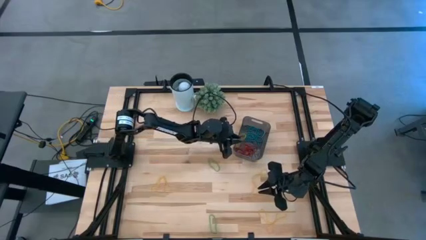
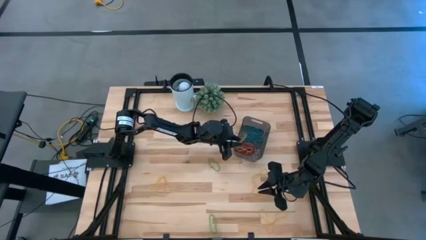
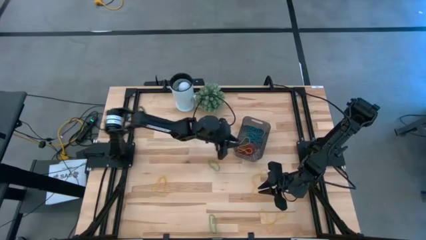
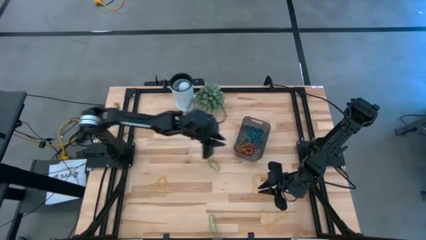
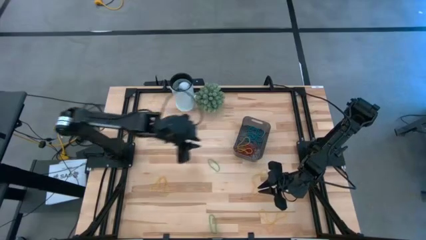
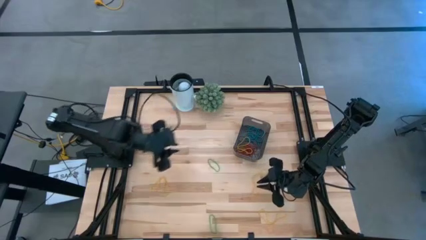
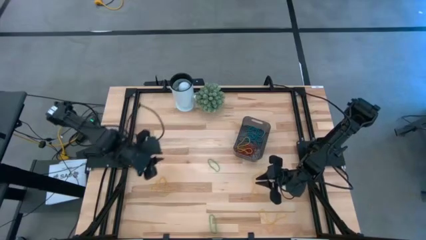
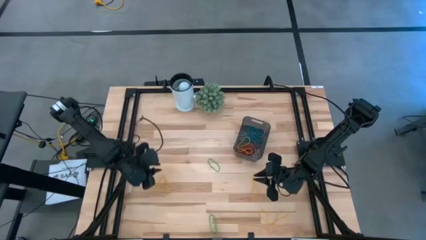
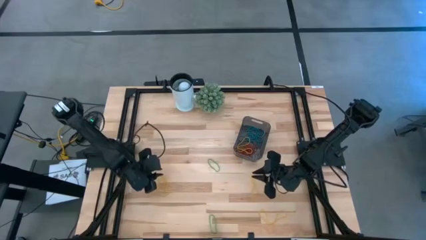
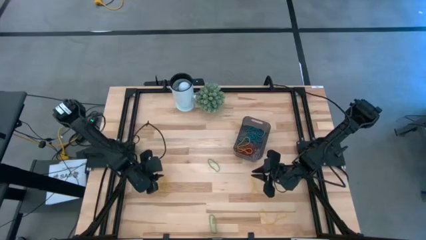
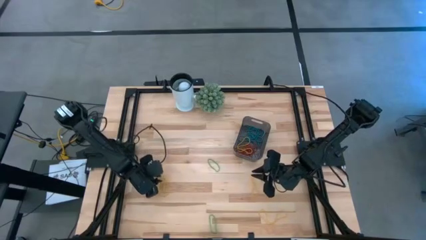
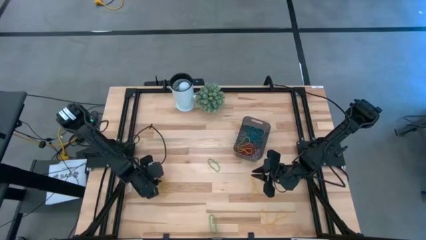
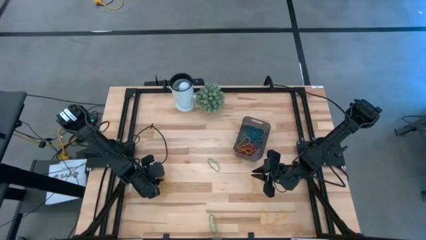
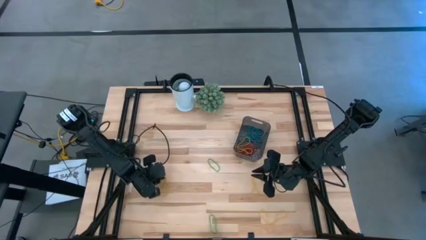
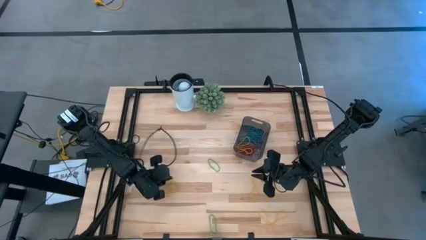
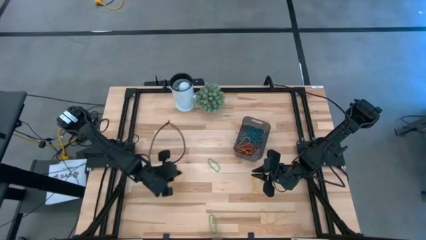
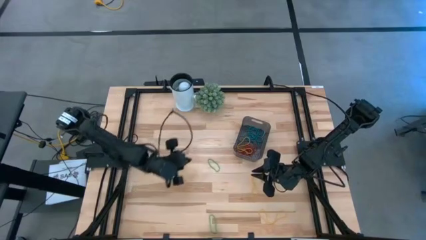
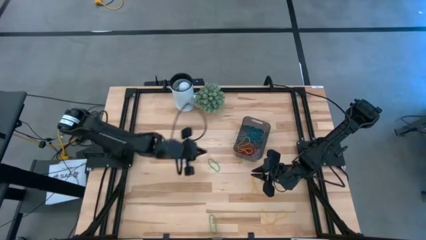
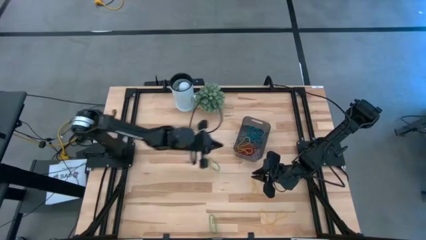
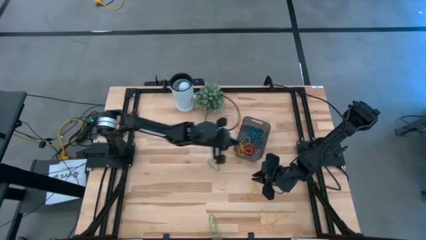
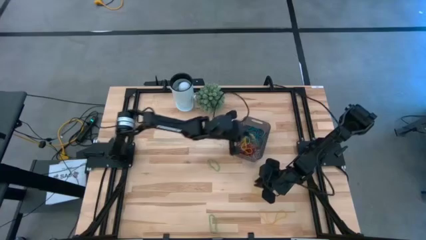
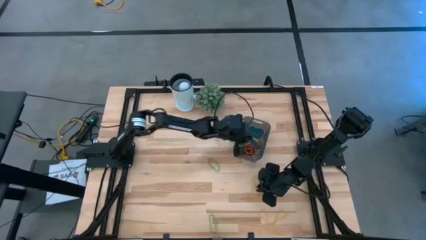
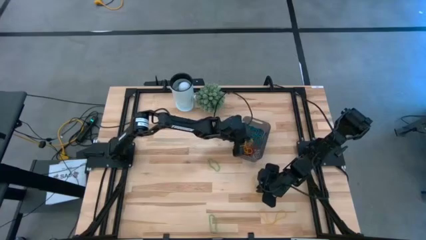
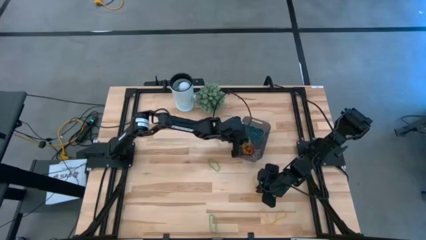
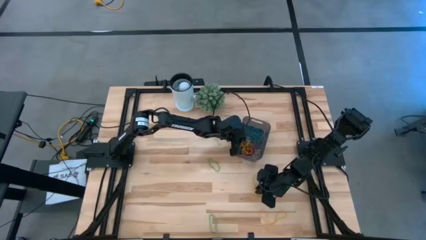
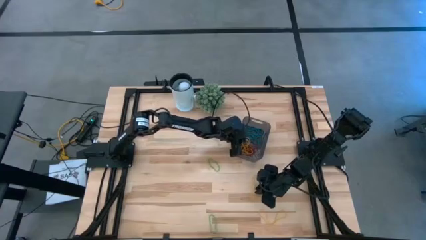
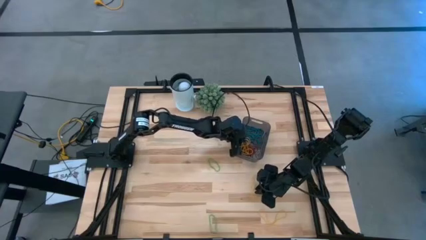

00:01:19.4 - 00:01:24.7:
Task: Pick and place items into bin
Put the yellow rubber band into the black bin

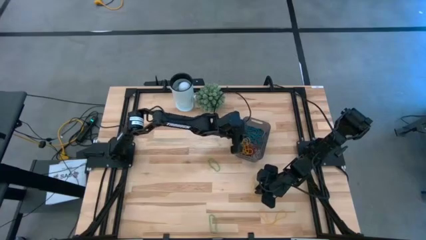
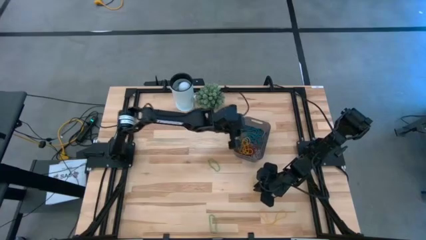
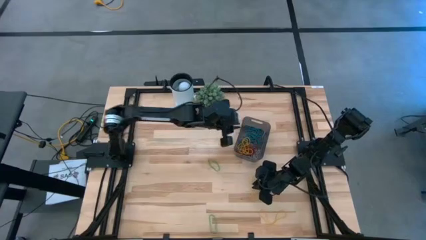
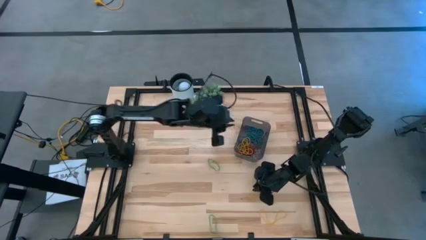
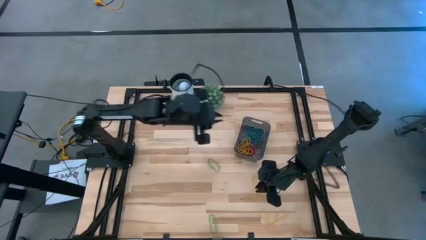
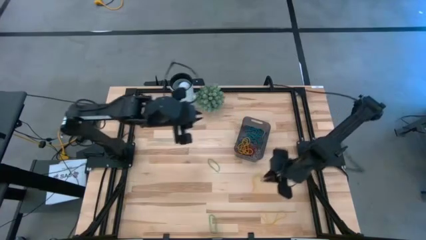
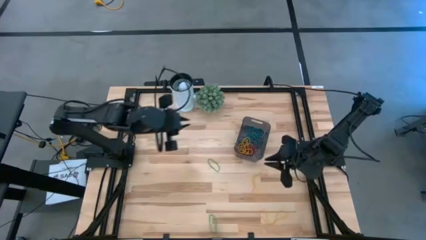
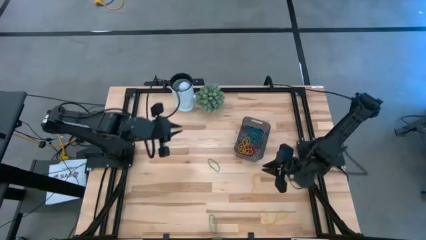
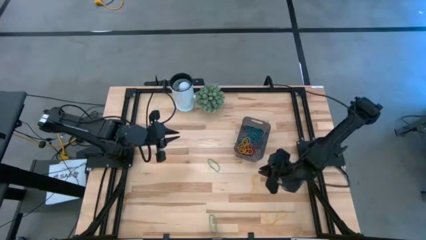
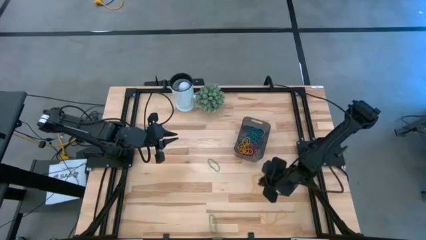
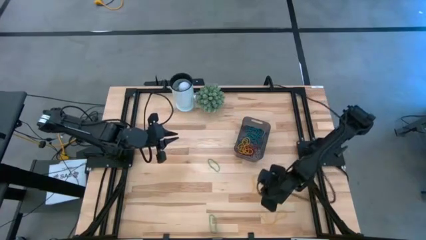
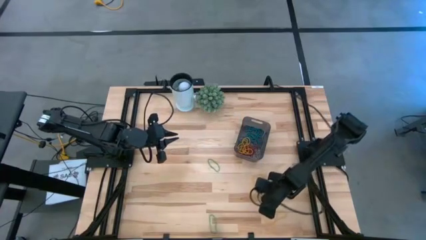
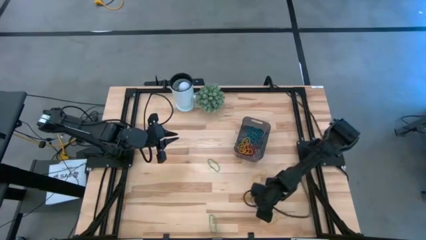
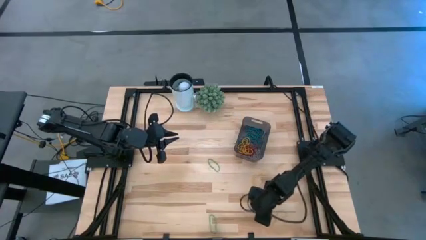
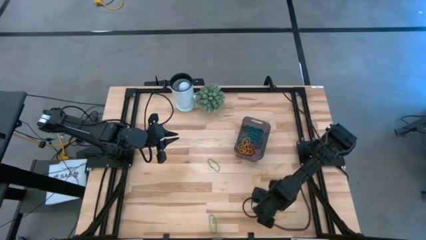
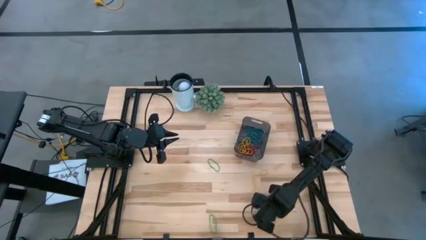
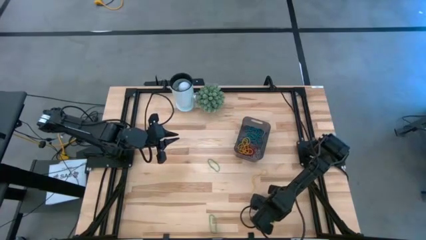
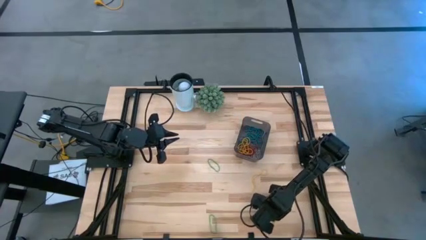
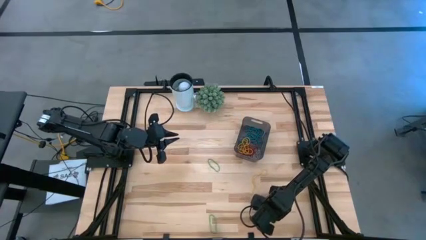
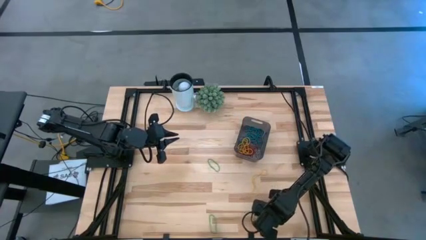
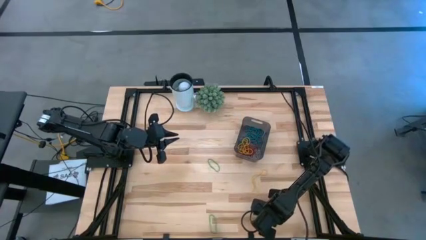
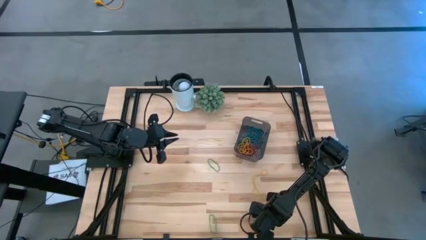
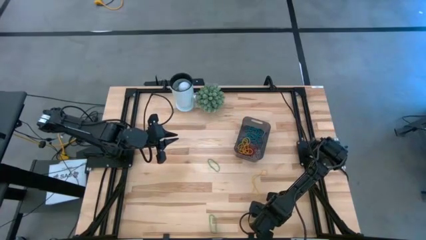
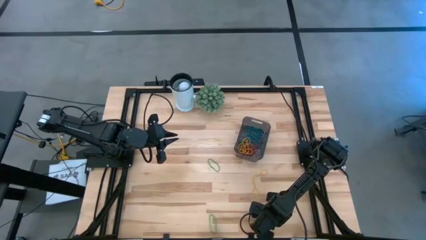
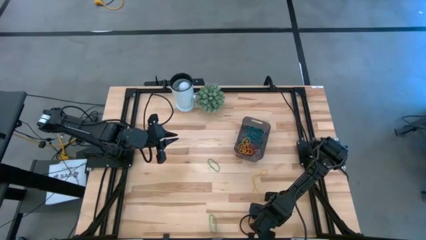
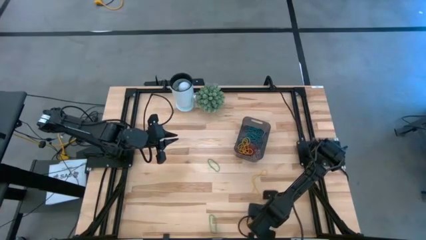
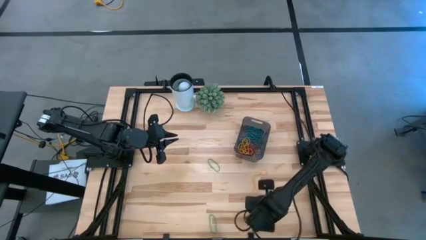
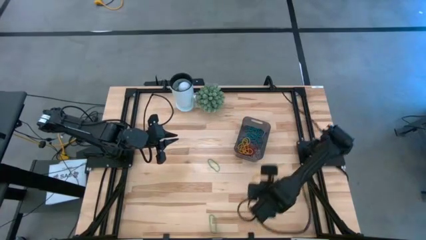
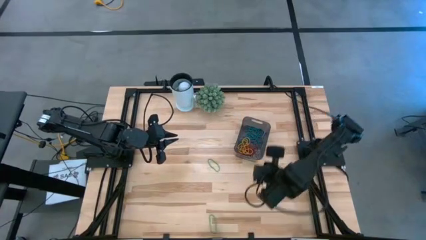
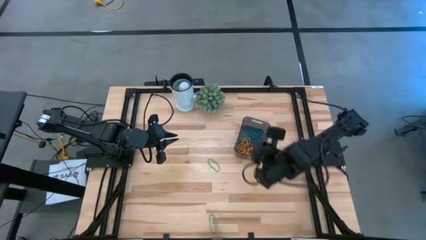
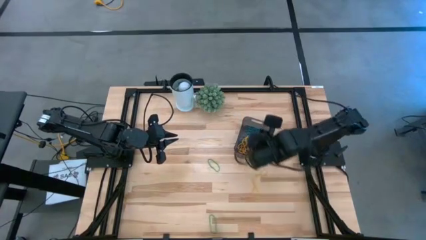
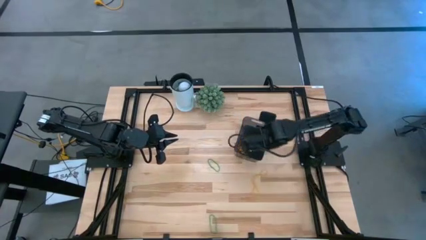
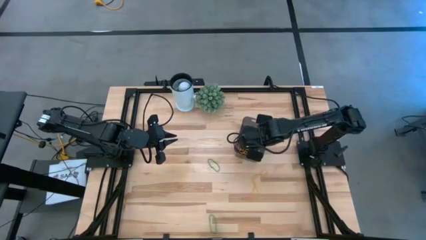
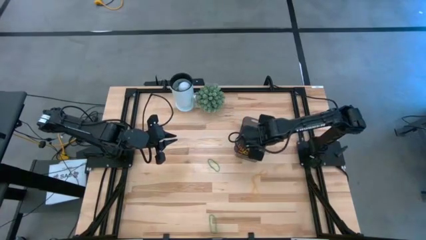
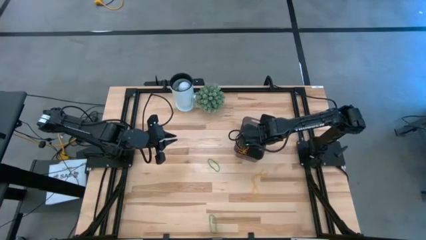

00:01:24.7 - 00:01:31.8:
Put the yellow rubber band into the black bin

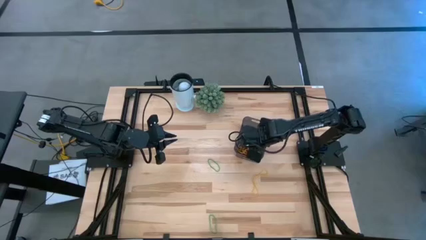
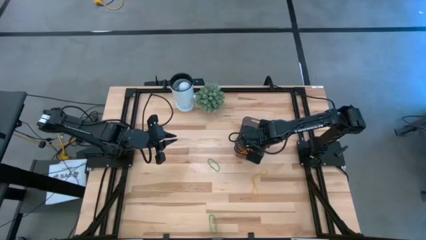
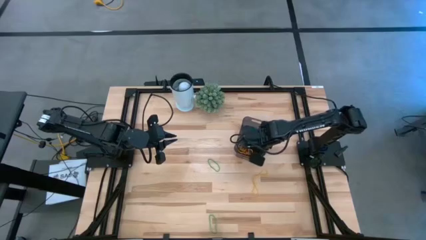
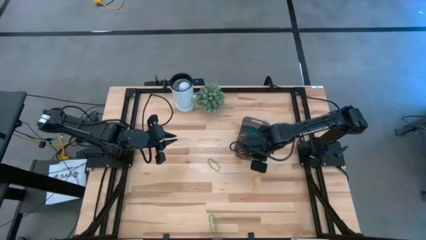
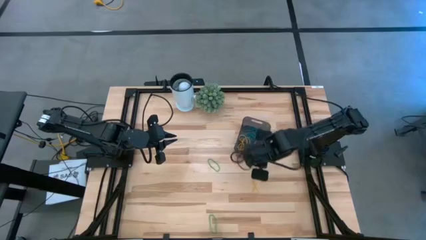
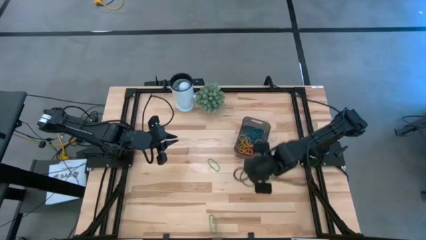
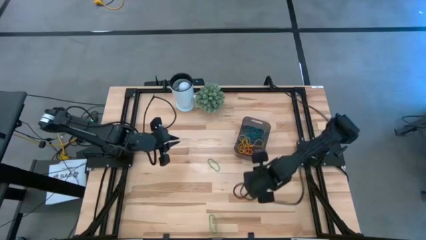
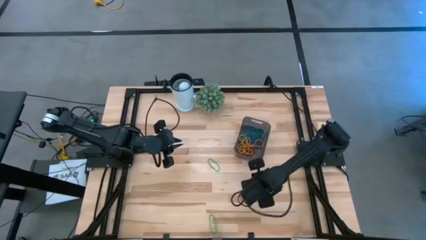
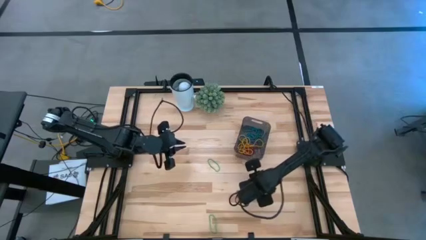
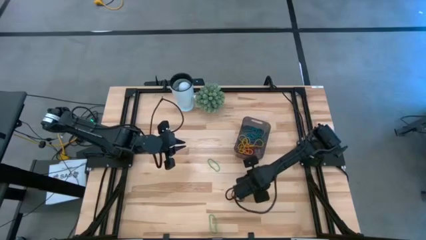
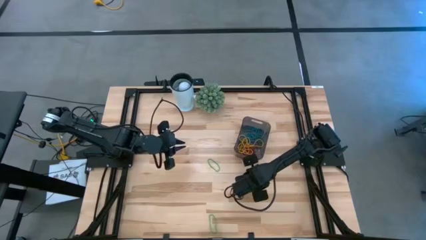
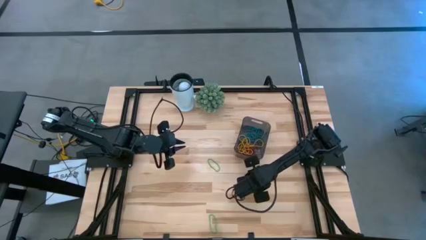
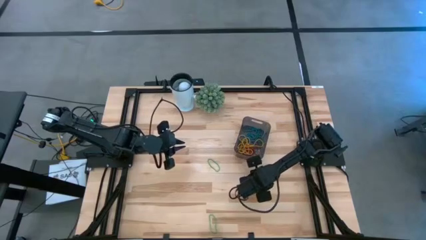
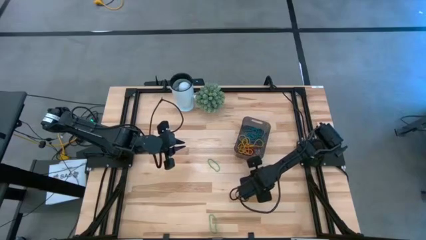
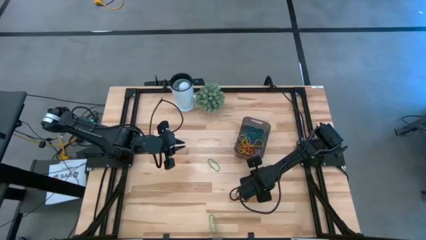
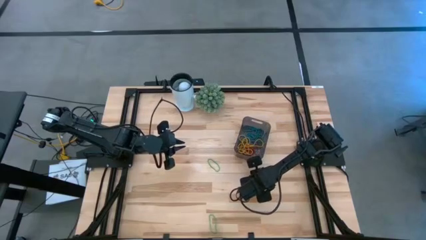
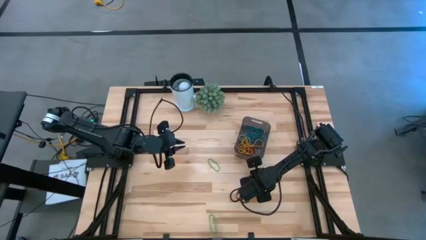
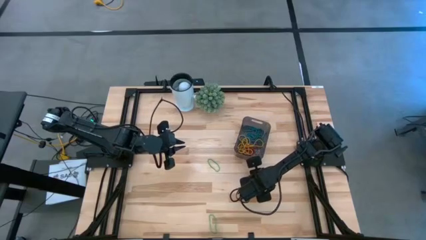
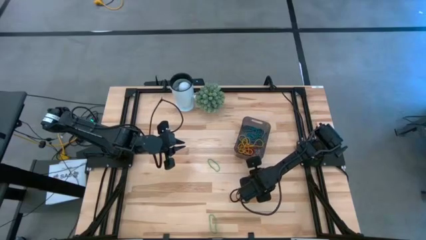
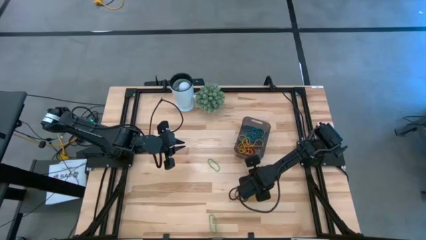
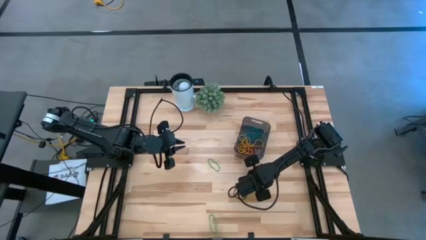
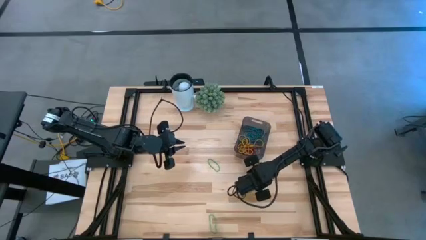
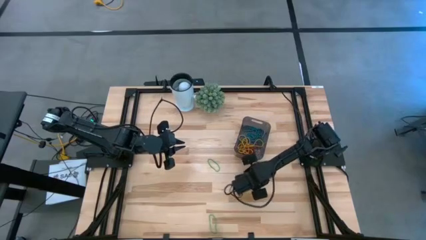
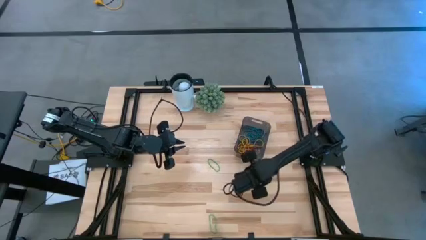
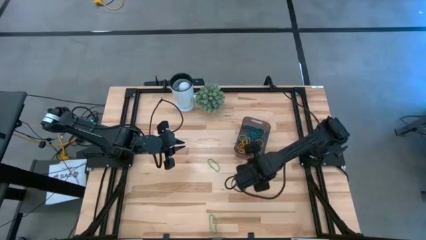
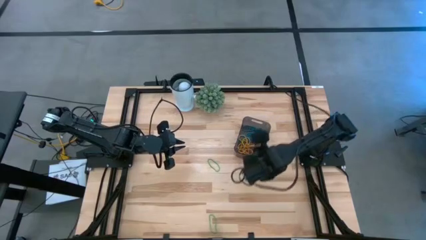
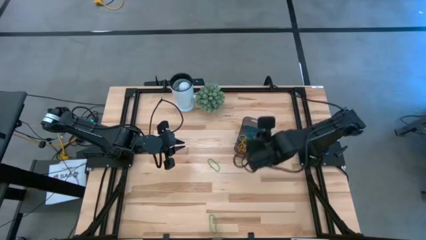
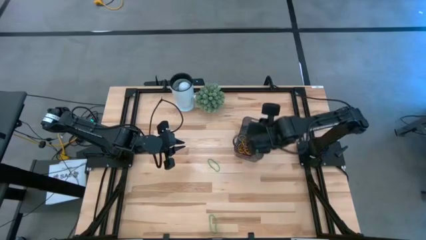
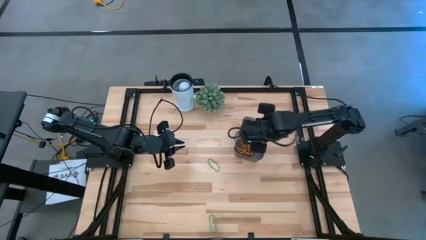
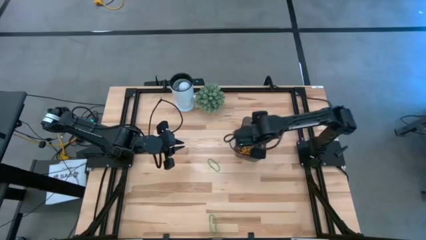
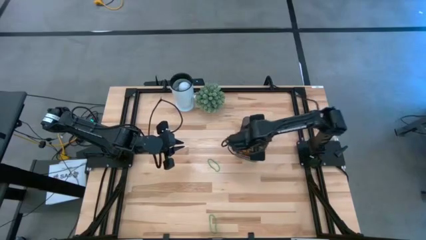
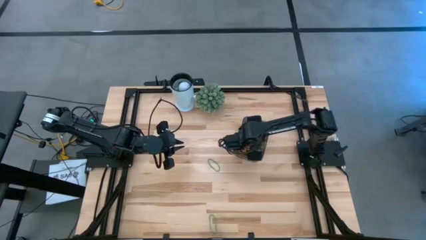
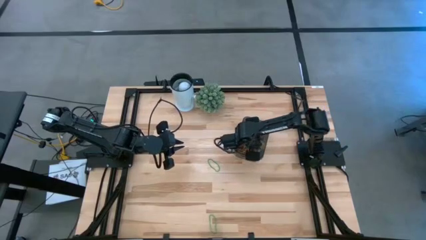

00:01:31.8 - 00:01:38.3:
Put the yellow rubber band into the black bin
